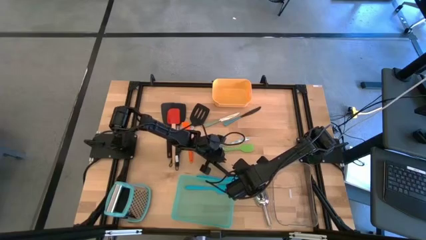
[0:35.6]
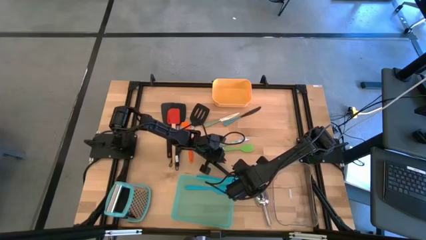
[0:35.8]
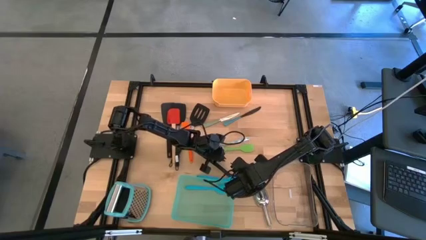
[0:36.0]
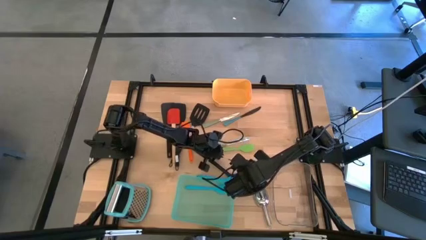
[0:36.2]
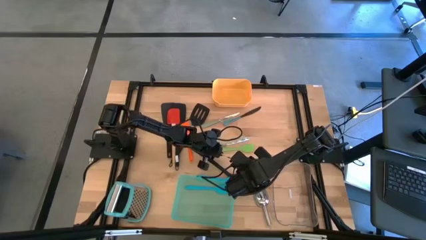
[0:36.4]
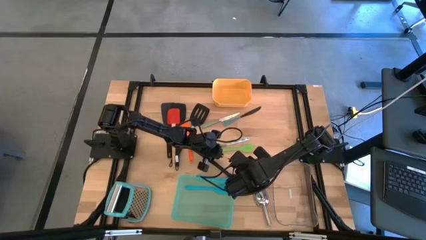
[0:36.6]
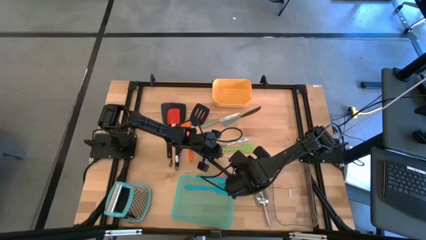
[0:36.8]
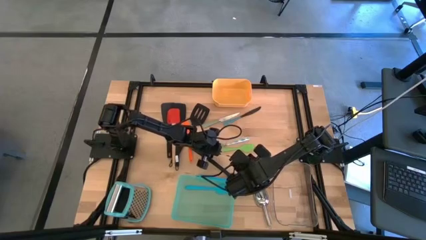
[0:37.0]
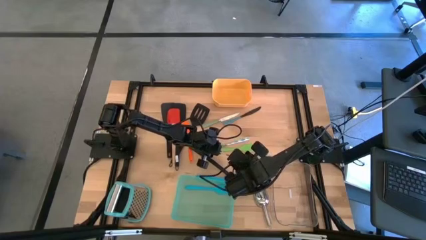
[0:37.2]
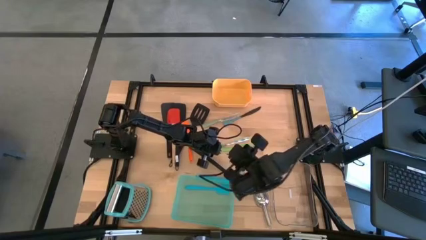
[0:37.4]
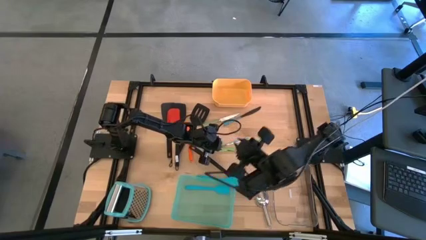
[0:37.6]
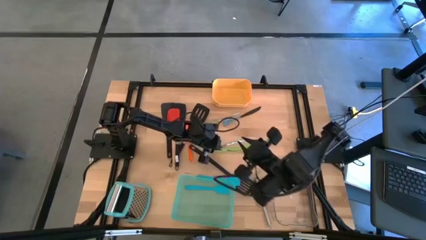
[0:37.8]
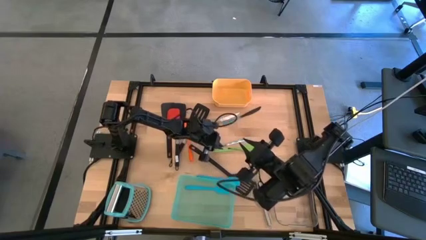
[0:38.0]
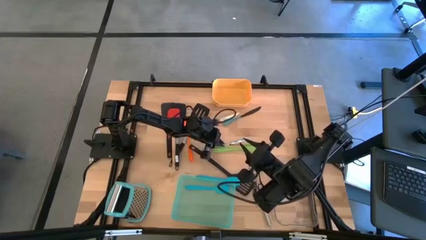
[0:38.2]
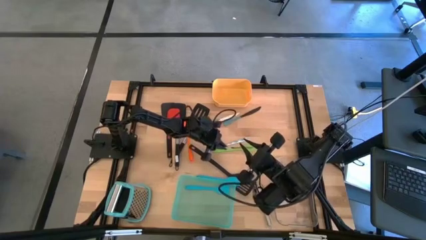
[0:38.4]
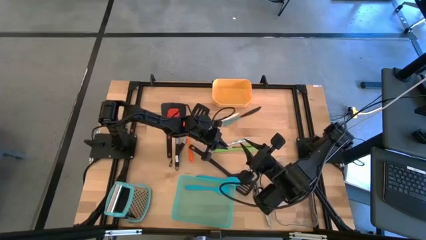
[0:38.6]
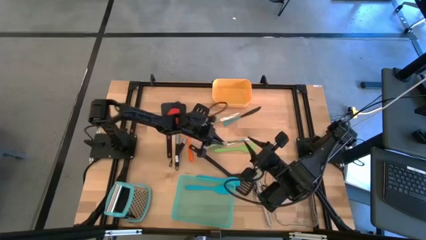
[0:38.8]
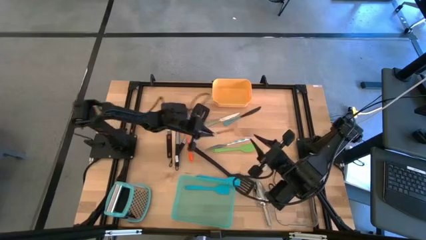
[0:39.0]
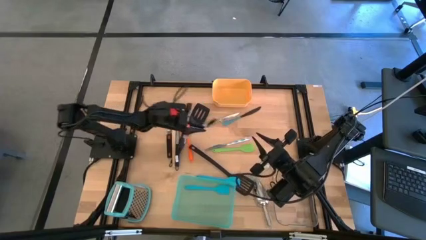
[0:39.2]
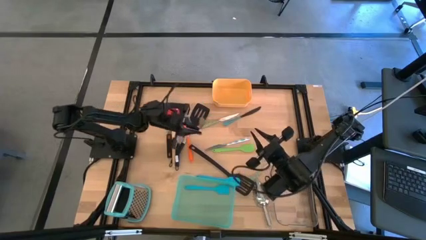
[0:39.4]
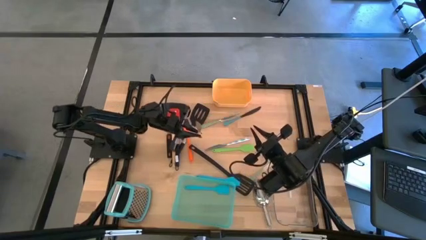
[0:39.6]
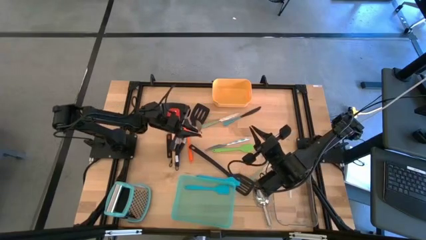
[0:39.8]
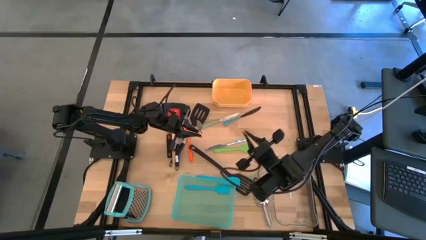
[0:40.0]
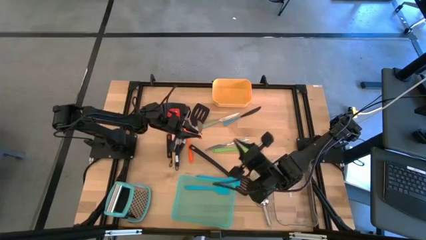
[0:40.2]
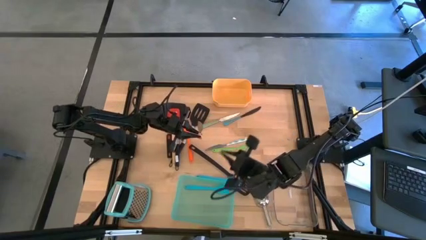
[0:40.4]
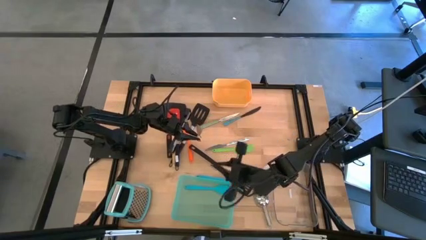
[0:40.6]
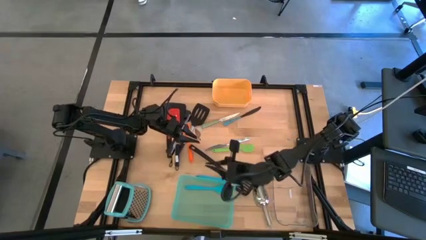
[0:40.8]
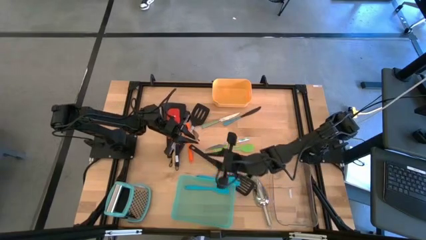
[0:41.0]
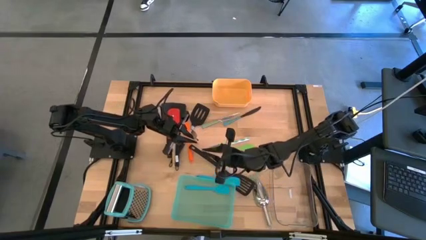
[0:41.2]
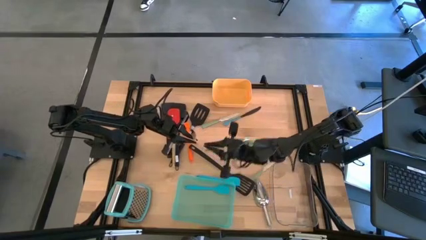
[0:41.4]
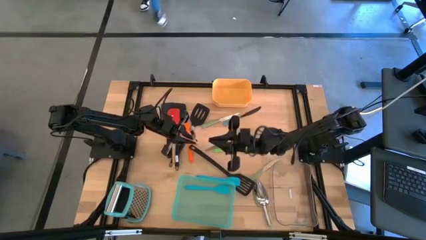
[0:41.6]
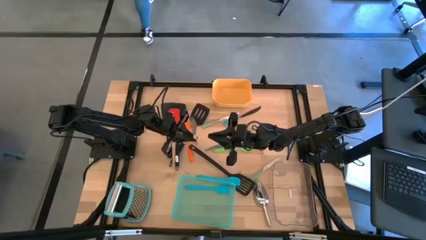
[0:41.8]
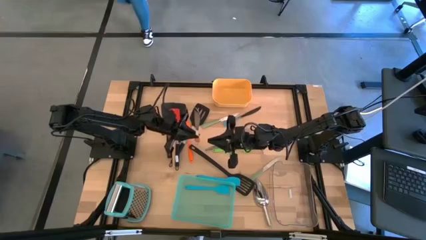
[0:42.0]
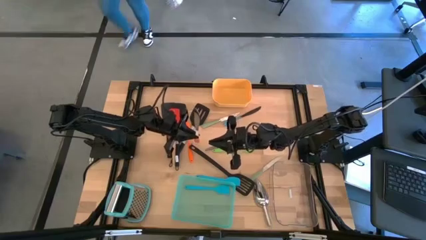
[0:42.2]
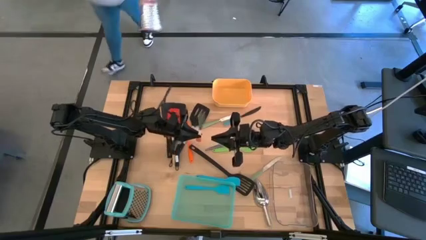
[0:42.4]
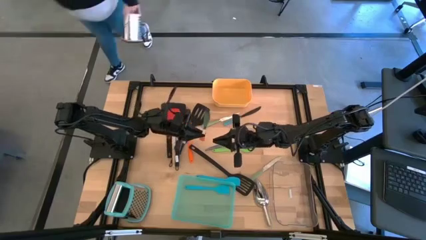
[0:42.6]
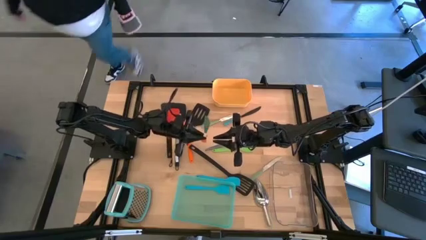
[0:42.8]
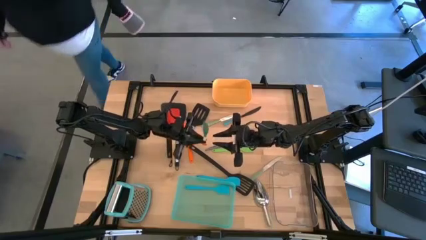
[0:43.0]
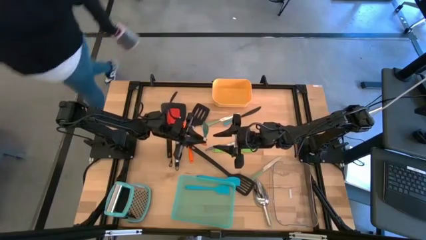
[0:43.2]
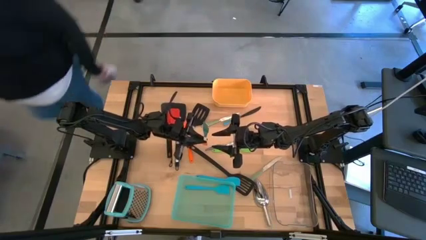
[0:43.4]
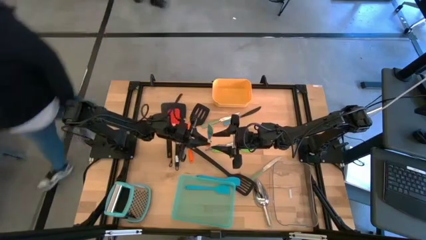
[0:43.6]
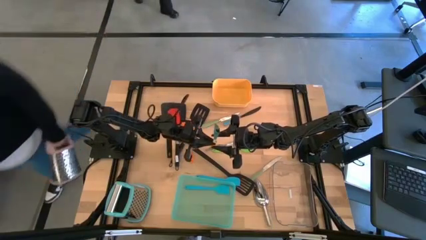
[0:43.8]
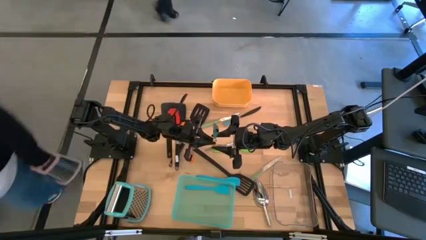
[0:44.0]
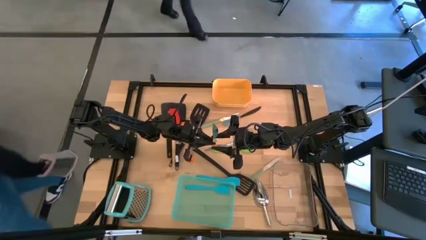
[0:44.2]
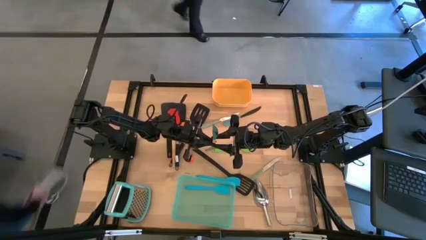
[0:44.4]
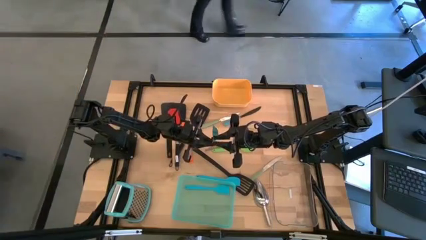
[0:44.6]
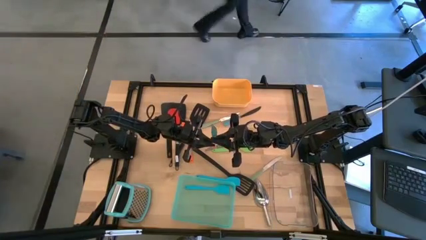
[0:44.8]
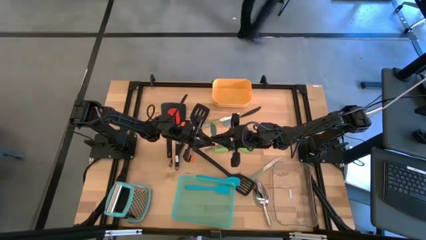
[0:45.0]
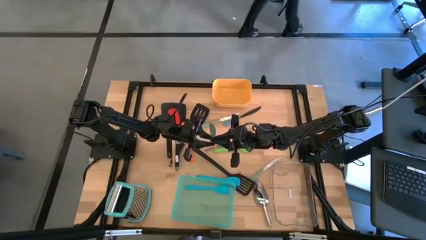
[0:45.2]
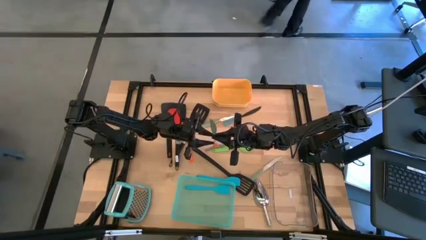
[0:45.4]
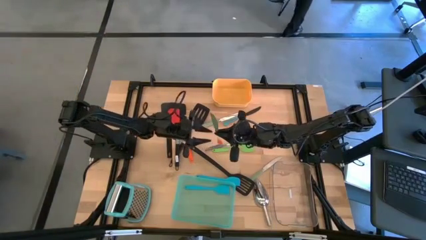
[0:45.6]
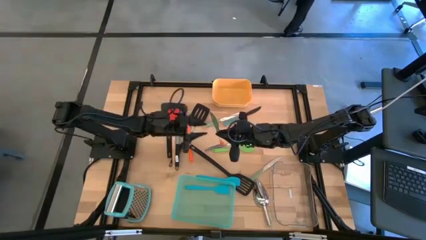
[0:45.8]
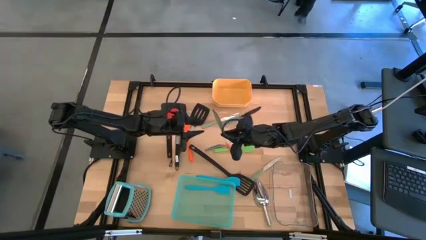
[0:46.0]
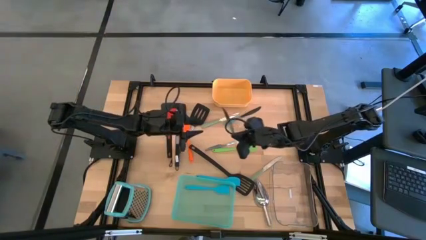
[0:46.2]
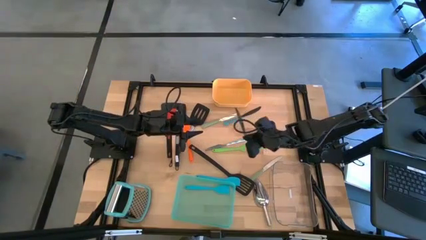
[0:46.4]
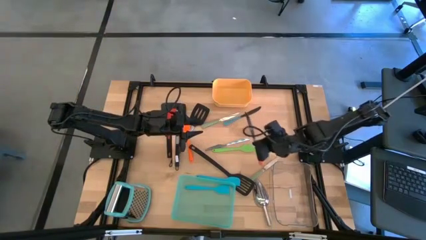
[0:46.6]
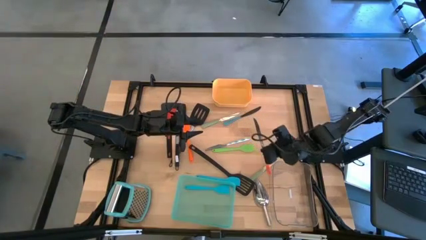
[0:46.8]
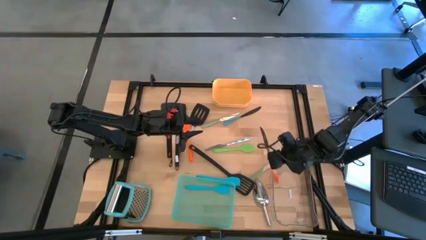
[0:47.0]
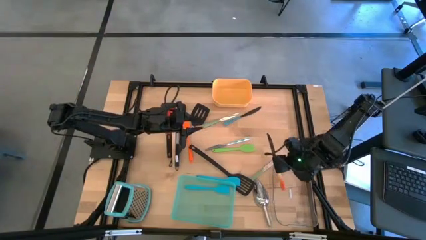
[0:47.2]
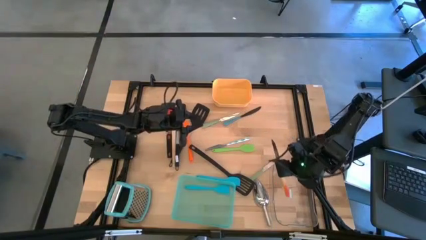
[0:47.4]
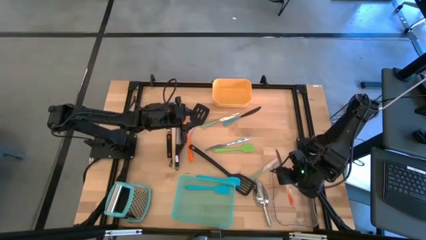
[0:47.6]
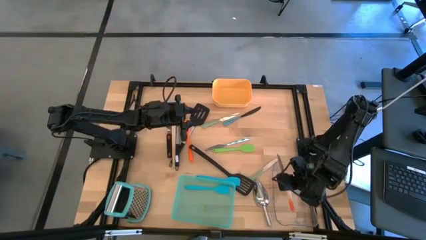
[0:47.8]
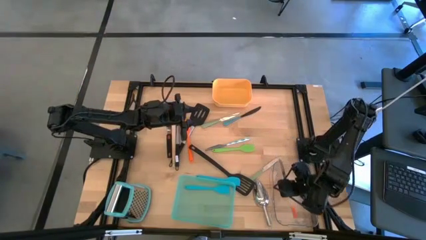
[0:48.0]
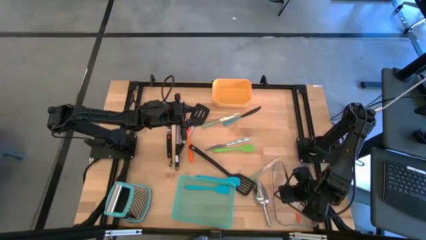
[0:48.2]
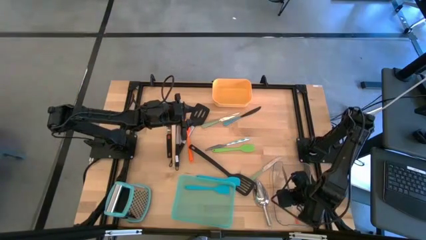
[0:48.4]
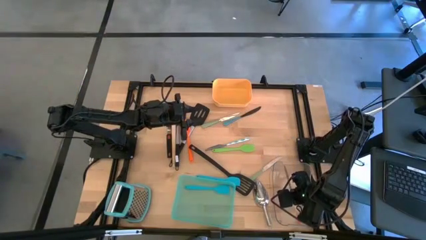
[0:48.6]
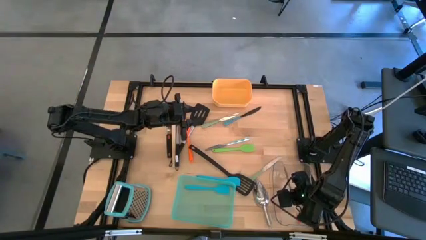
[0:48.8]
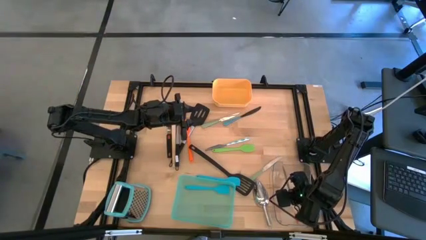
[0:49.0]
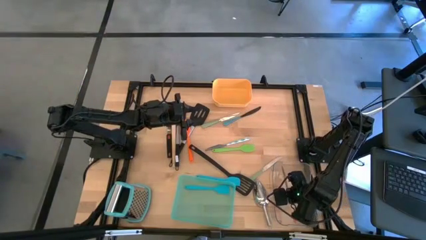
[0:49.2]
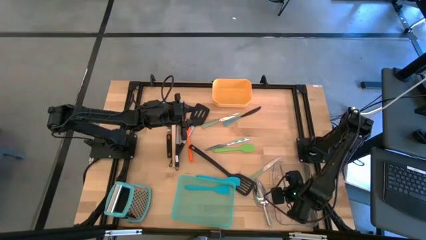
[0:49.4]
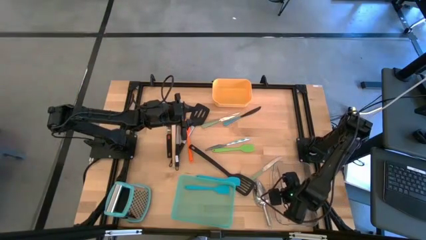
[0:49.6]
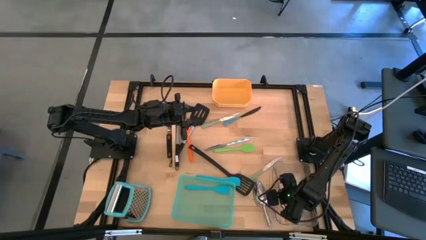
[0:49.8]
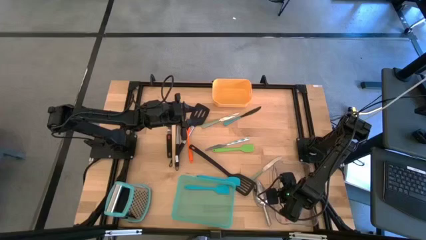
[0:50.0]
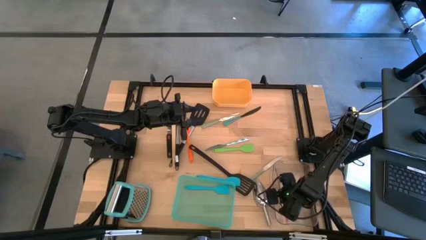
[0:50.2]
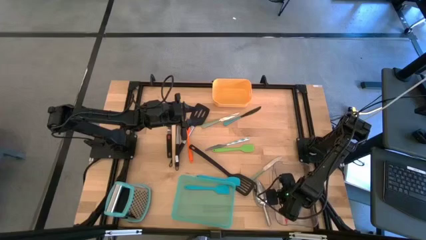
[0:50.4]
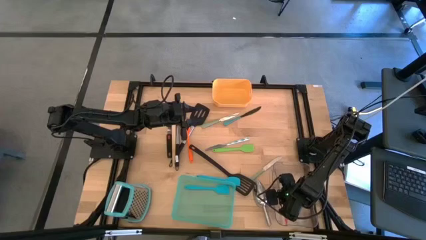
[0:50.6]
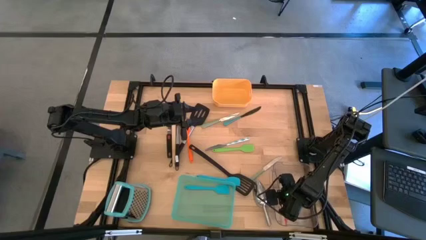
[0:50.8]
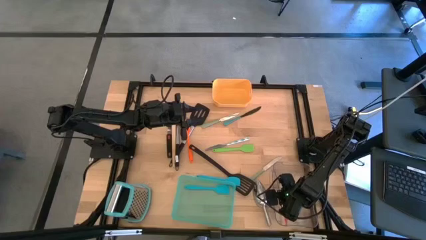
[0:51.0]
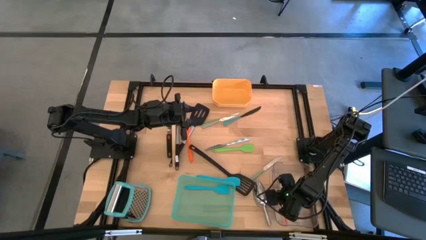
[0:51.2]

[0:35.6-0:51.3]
Task: Pick & Place Kitchen Items
Put the orange table knife into the transparent bin
